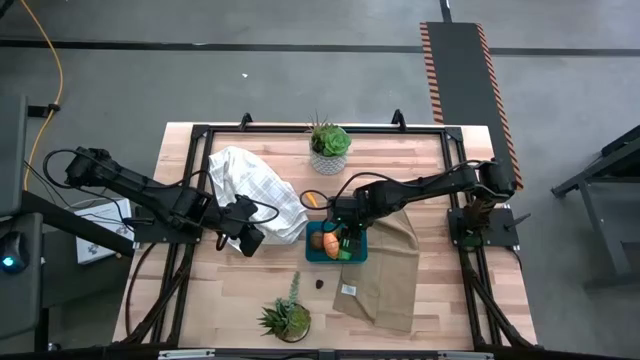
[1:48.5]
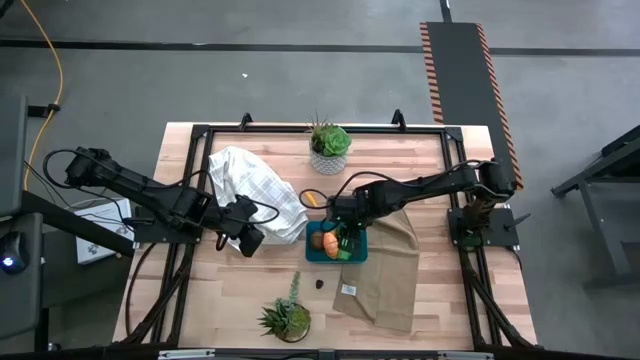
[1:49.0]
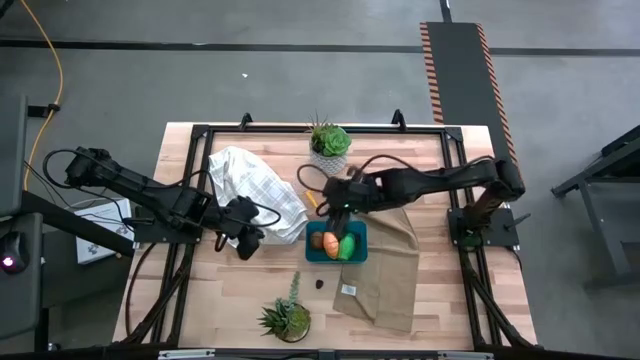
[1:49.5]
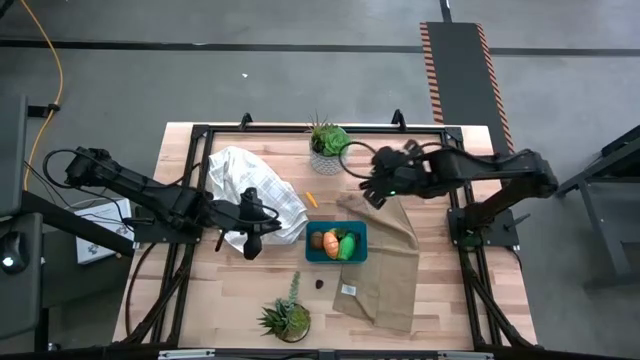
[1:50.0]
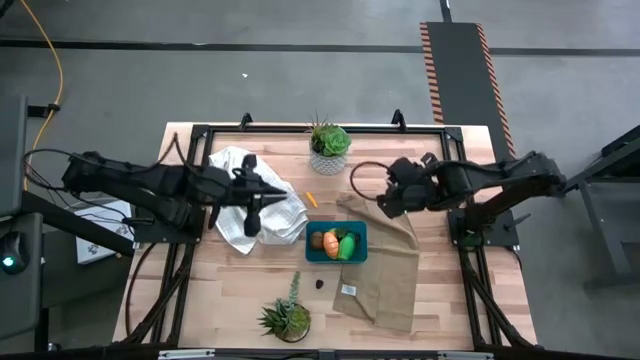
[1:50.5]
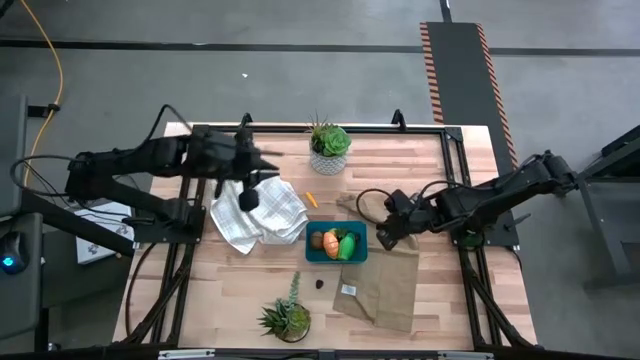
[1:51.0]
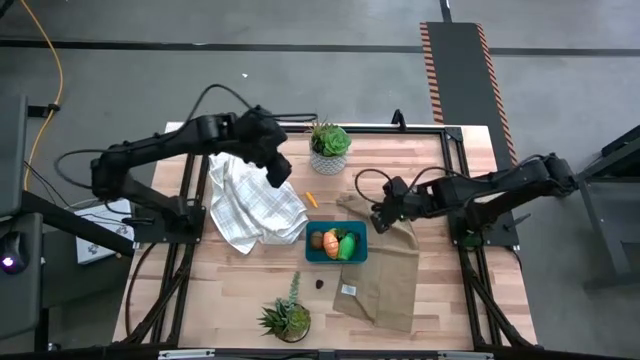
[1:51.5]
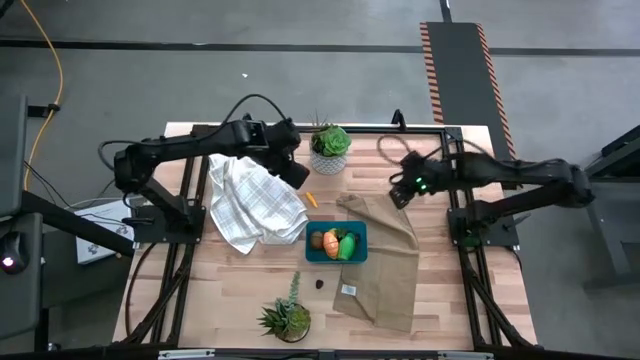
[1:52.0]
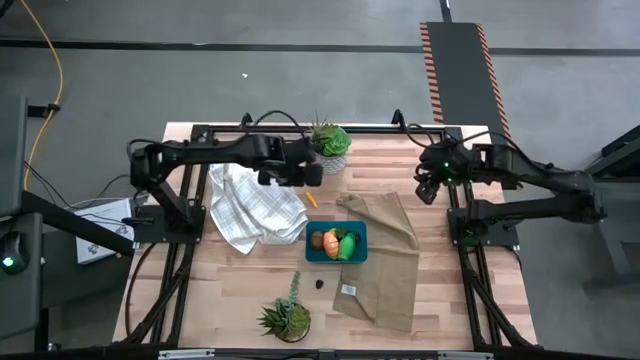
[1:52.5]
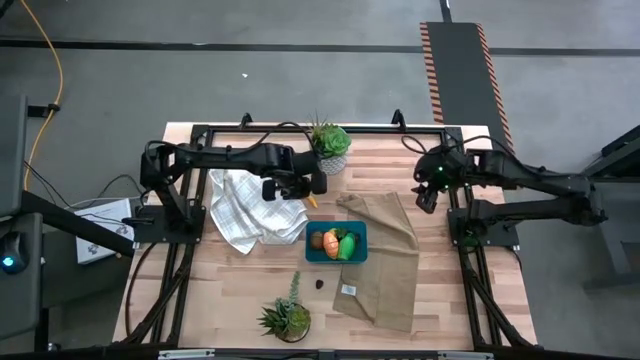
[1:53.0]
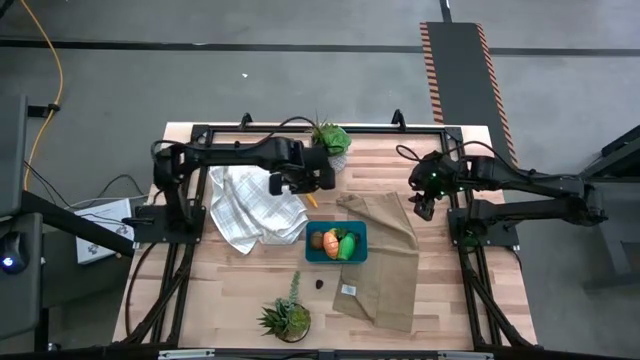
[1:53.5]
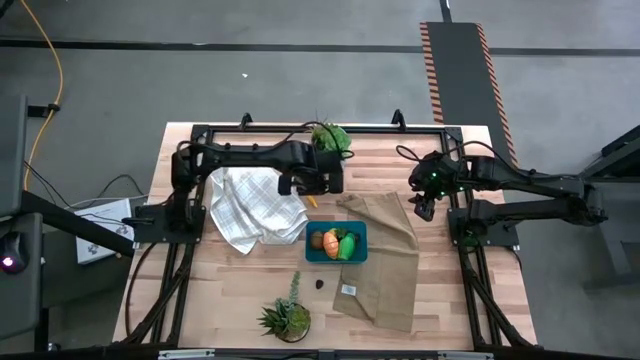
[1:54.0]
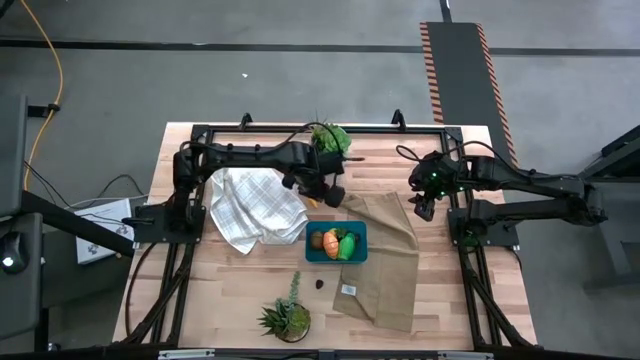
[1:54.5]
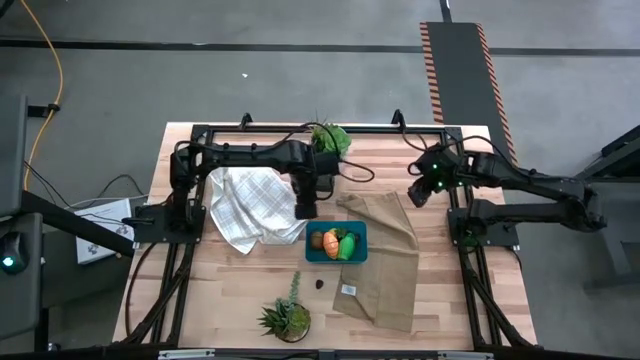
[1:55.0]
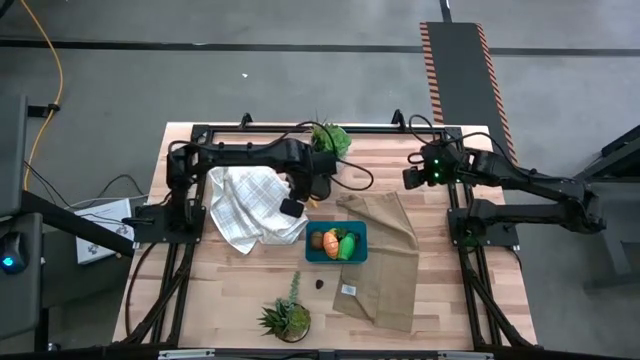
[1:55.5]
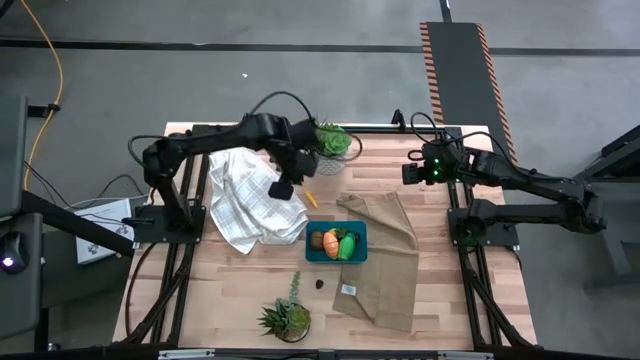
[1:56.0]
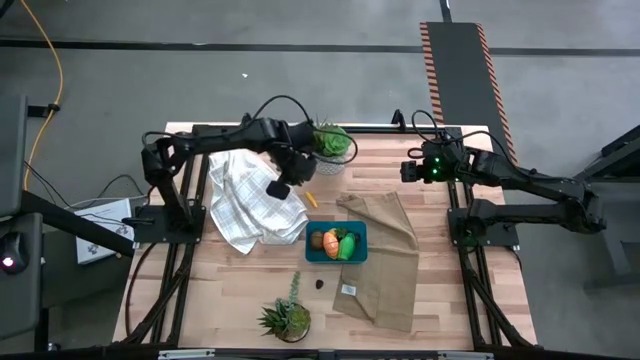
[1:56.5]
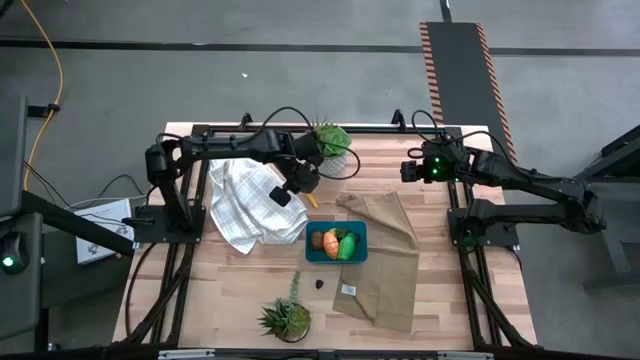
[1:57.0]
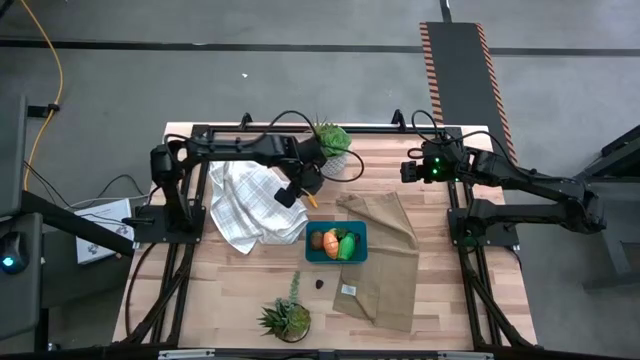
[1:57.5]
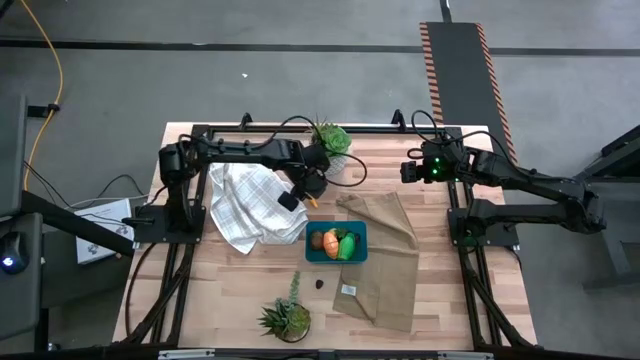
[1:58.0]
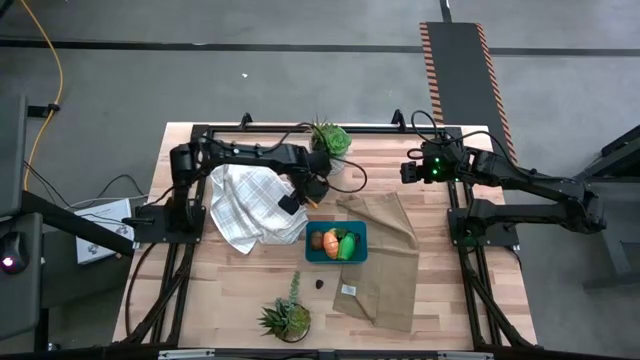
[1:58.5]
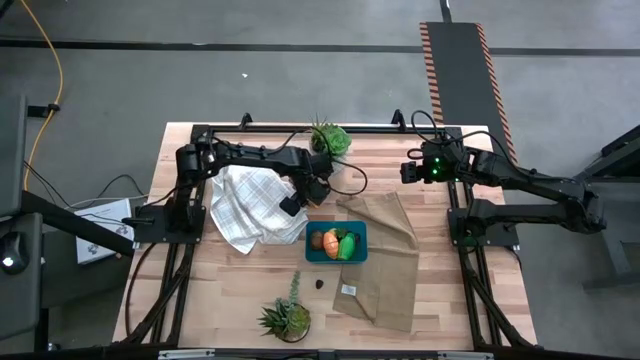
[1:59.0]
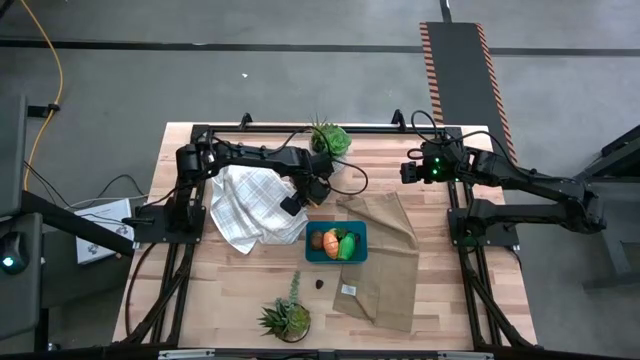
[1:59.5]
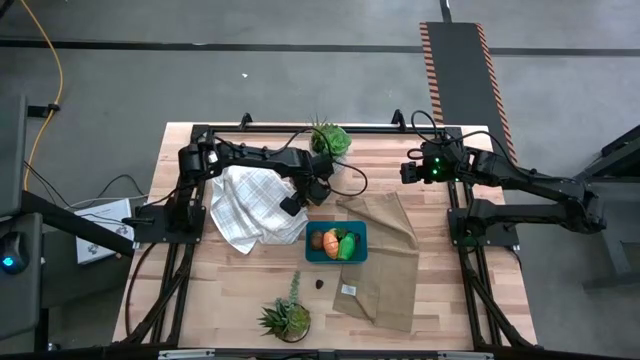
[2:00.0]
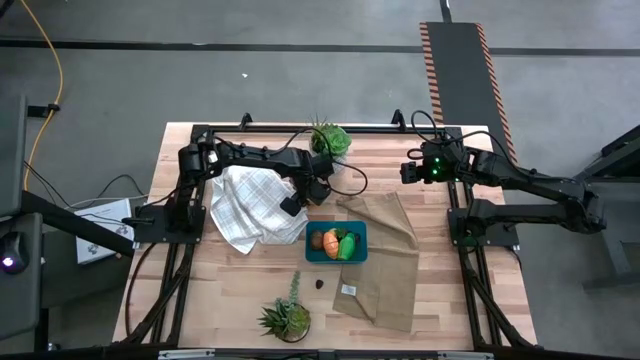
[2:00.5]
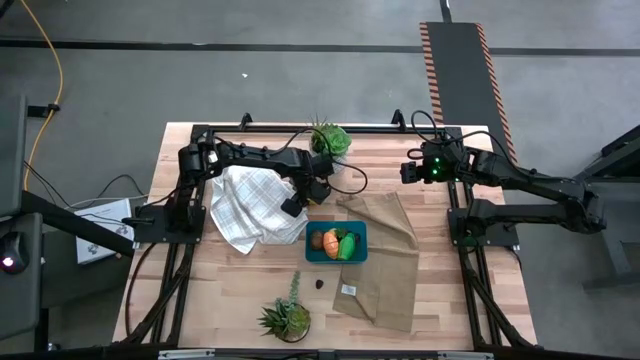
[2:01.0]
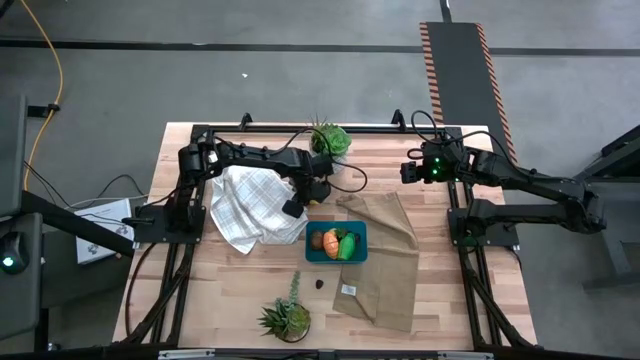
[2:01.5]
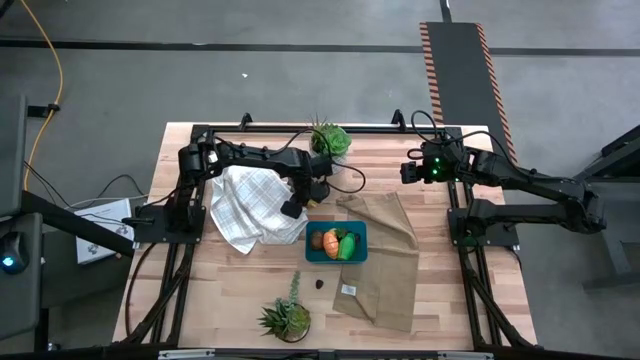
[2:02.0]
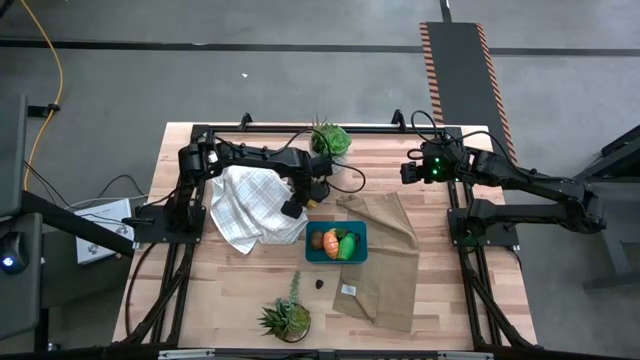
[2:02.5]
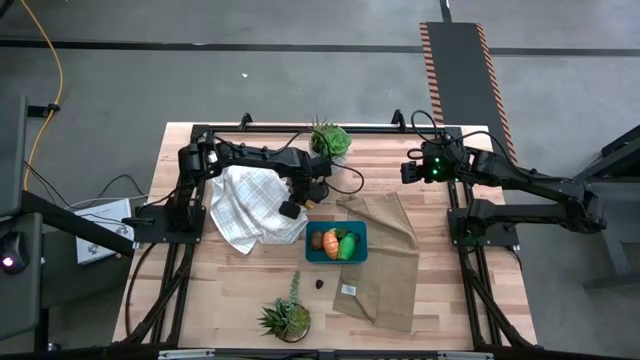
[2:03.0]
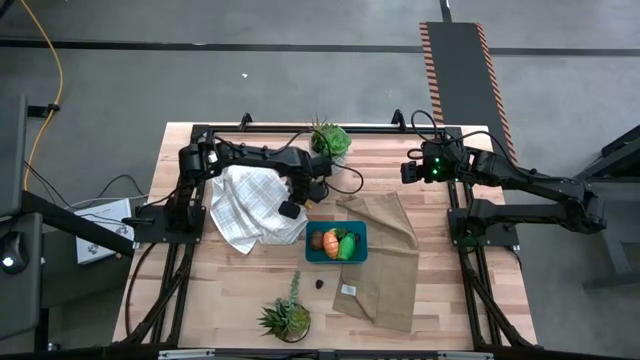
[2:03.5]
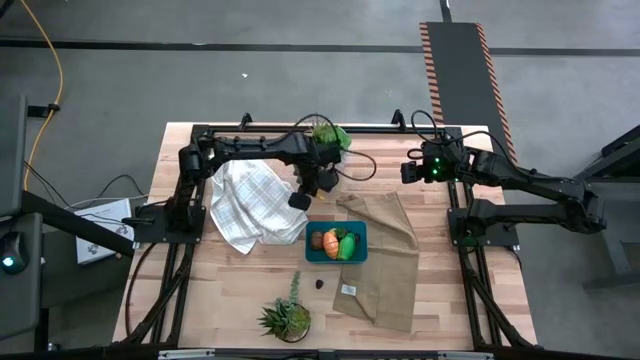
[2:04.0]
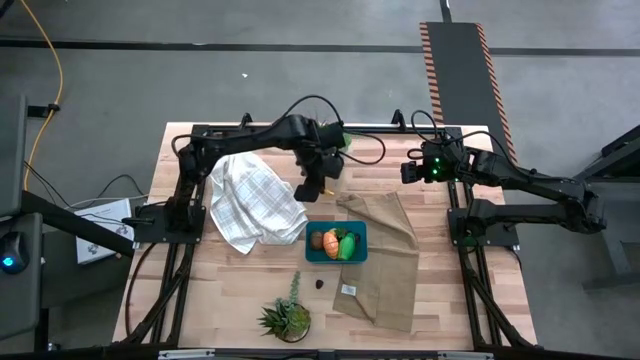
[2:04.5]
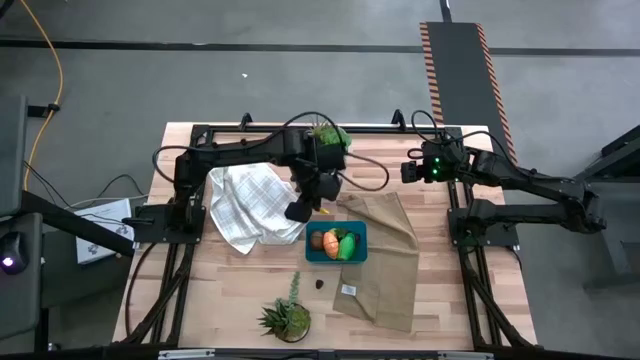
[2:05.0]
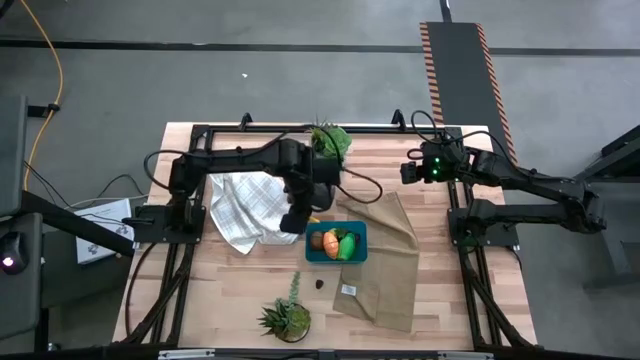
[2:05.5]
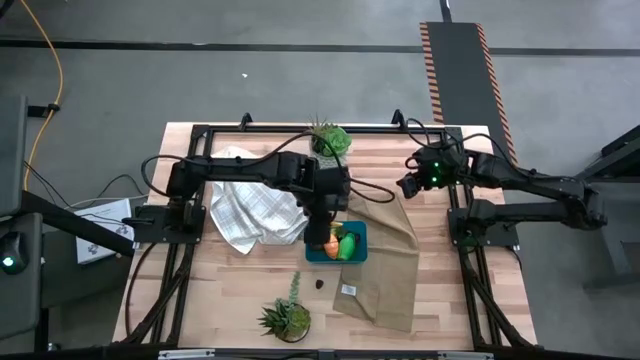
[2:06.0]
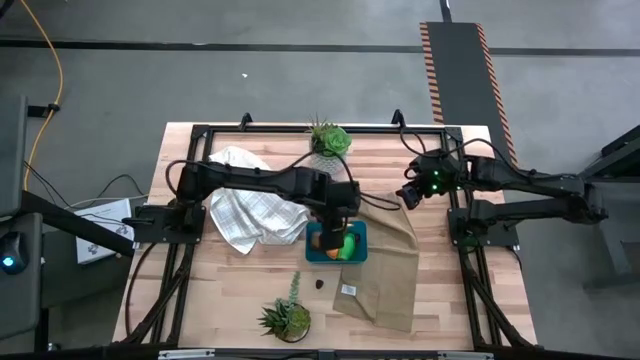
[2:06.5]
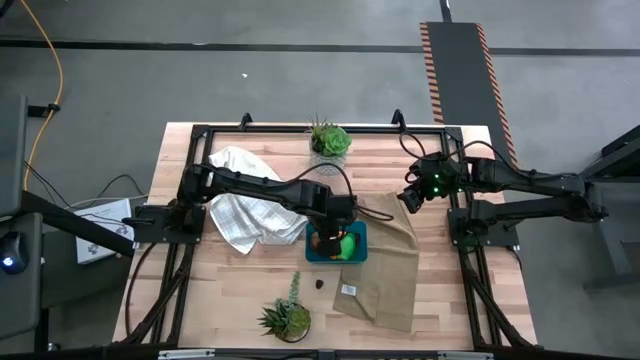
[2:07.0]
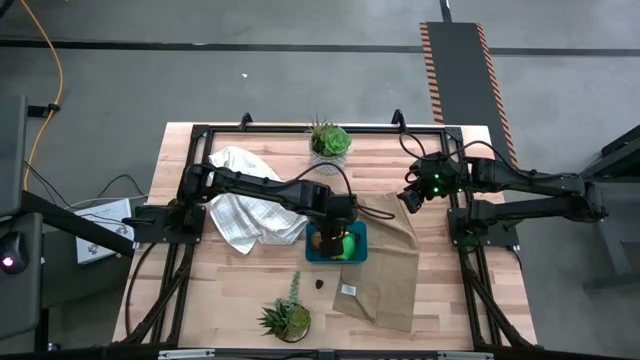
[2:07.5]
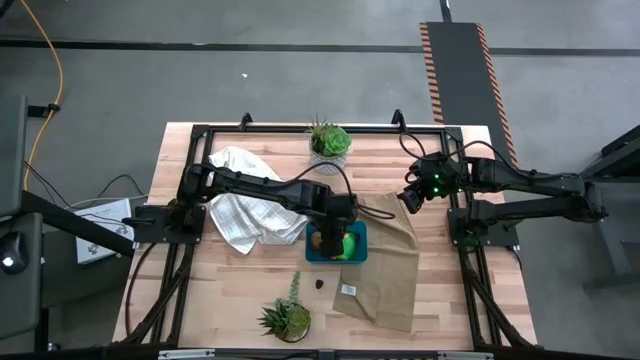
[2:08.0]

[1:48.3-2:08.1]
Task: Pick and placing Produce into tupperware
Put the yellow corn into the blue bin
